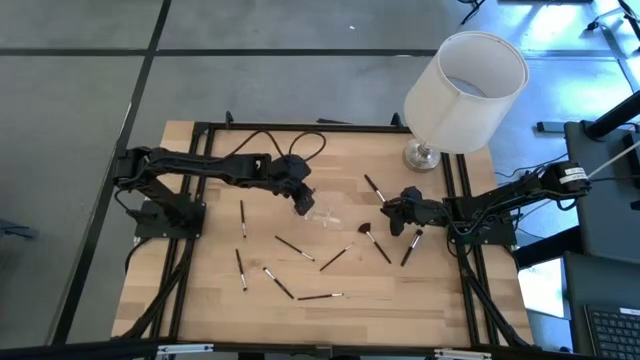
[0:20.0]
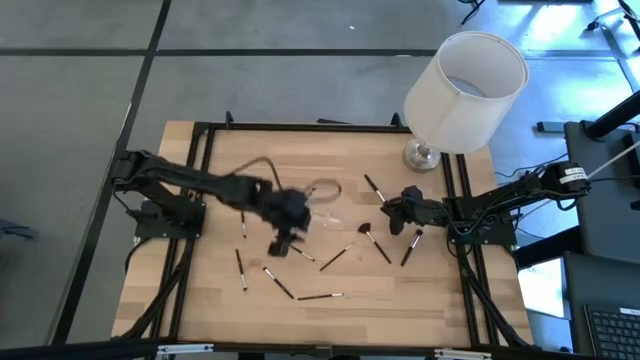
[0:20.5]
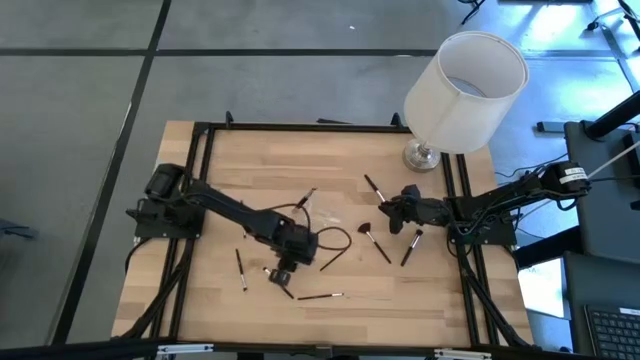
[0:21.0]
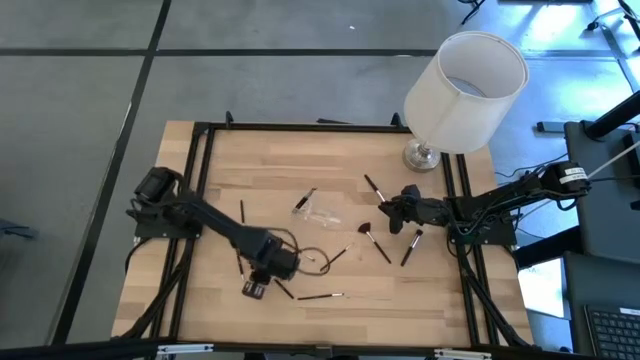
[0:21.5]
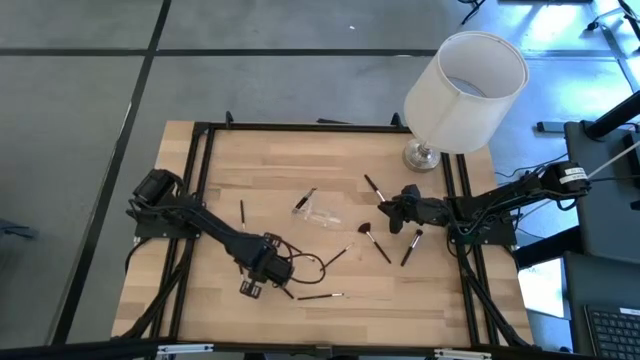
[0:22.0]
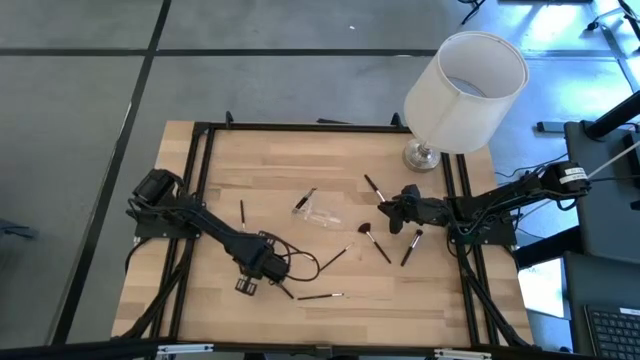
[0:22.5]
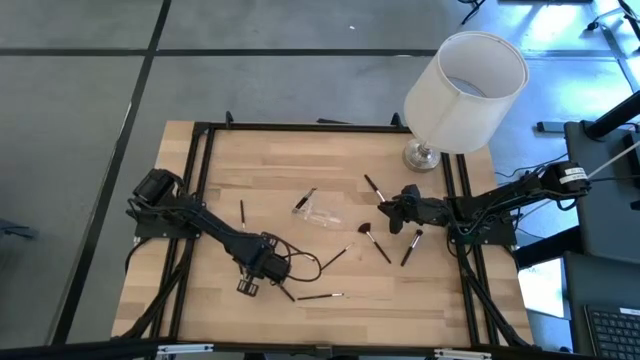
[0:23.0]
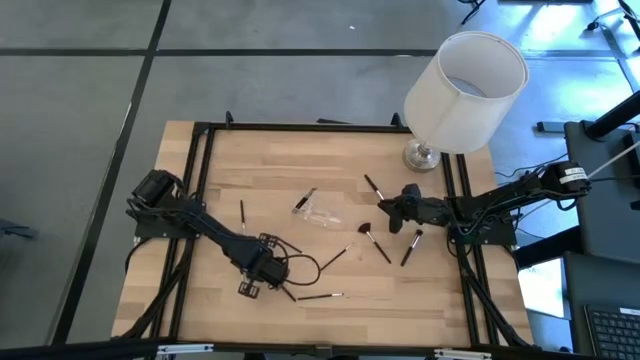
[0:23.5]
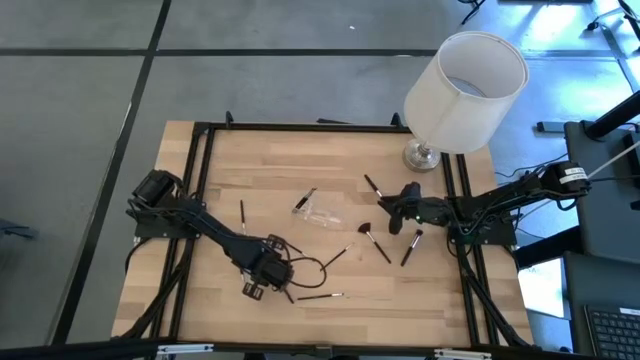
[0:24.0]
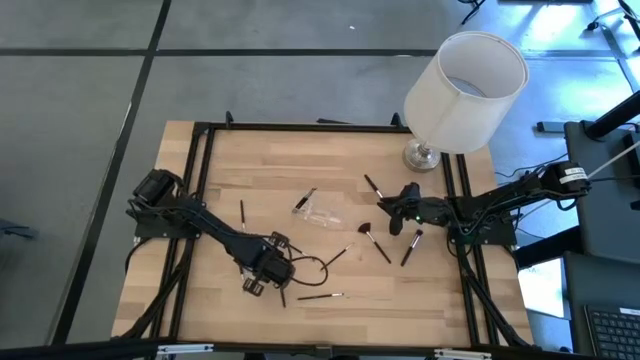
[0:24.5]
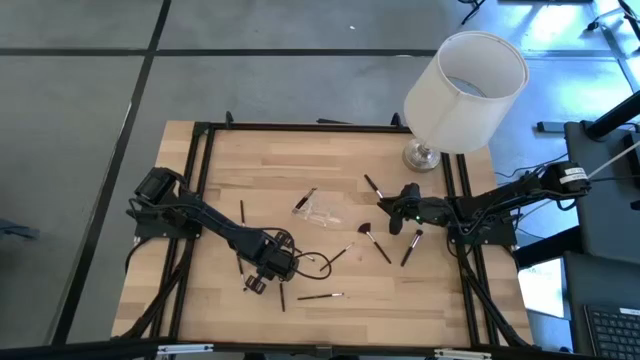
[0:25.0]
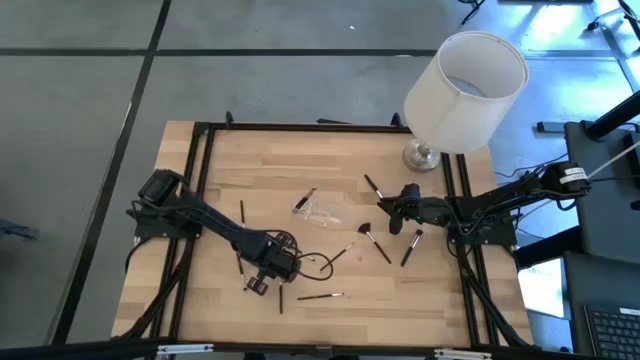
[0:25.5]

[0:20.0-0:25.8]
Task: Put items in baskets/containers
Put the eyeshadow brush into the transparent organizer

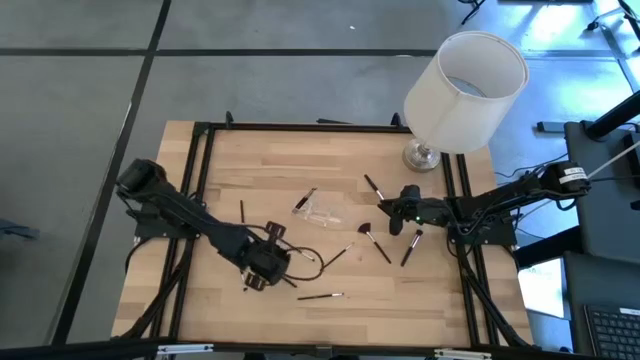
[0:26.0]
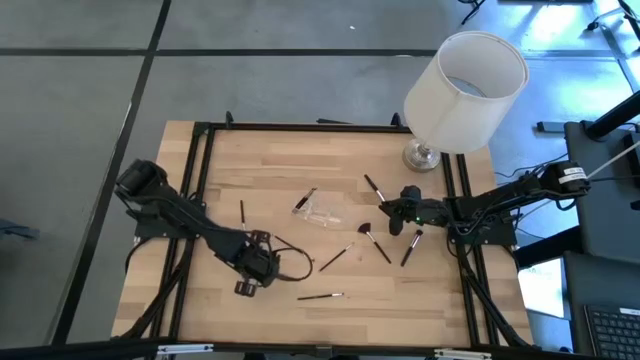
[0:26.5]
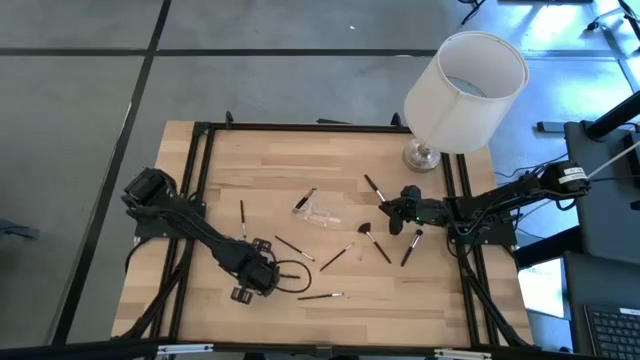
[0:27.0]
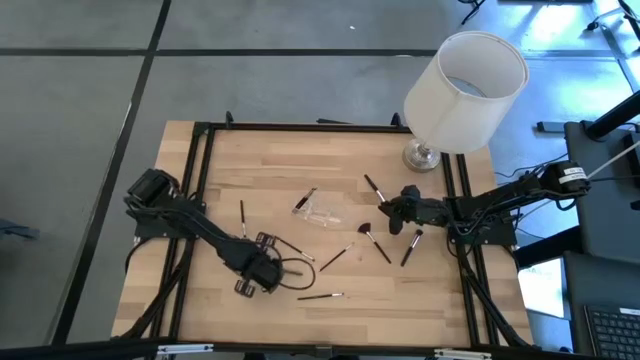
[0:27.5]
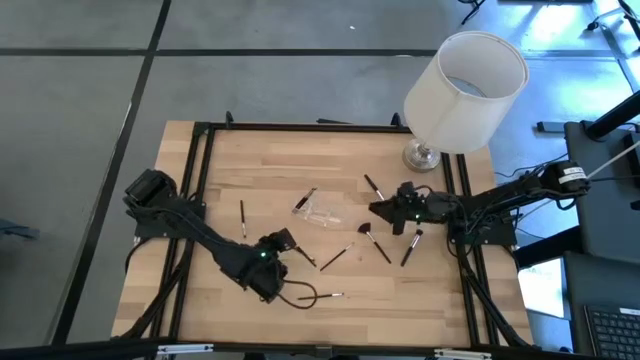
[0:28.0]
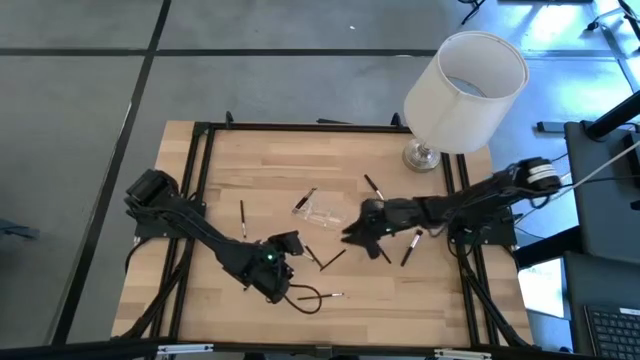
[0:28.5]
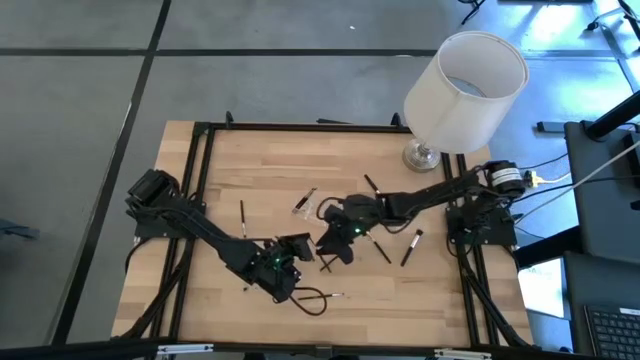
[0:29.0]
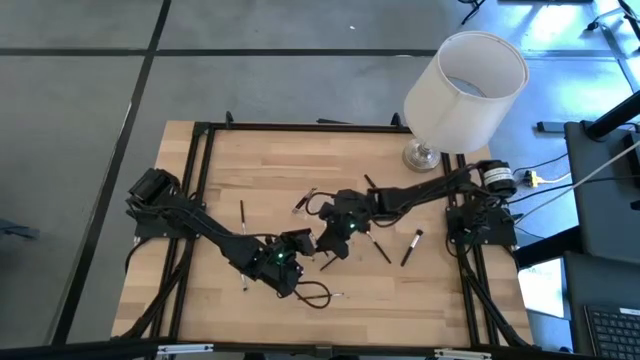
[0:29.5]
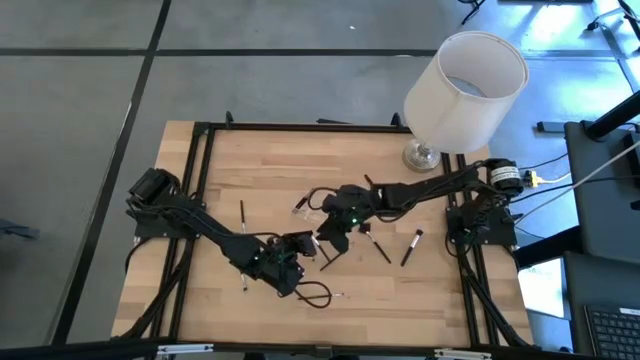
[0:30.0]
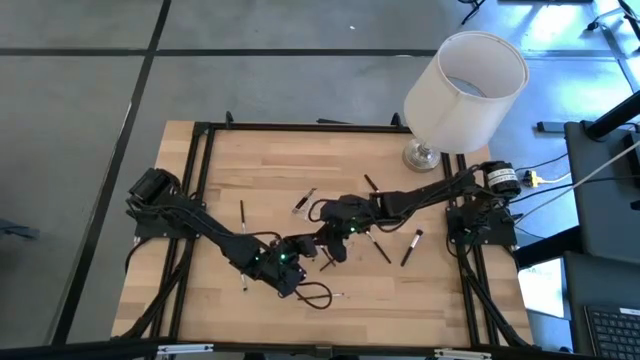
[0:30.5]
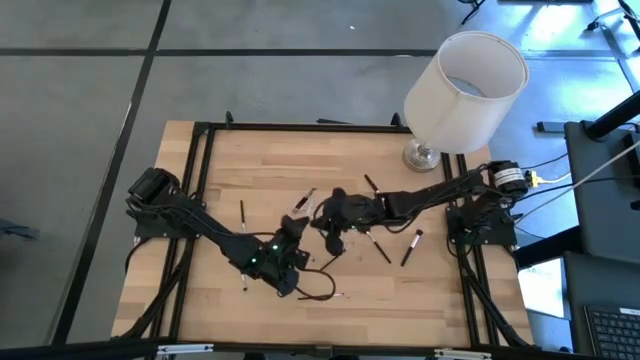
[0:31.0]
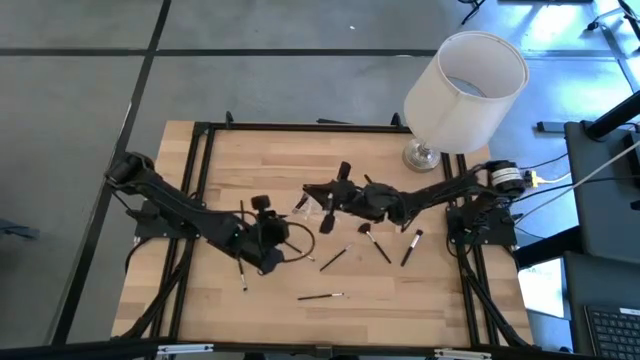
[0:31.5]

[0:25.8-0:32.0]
Put the eyeshadow brush into the transparent organizer

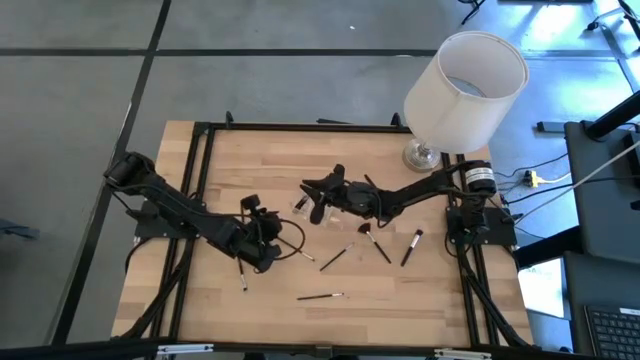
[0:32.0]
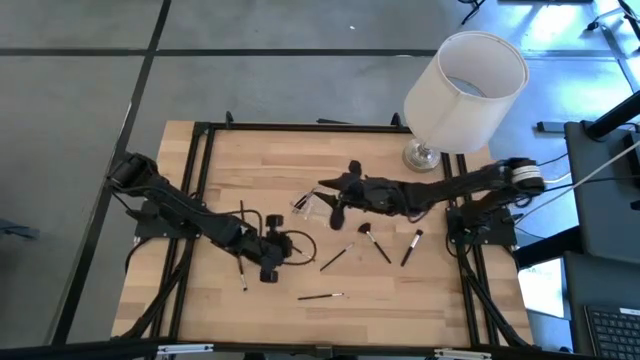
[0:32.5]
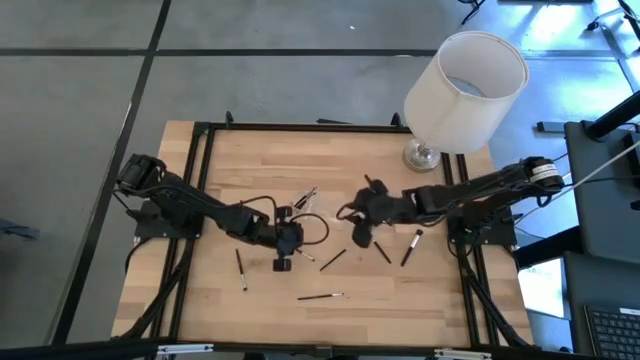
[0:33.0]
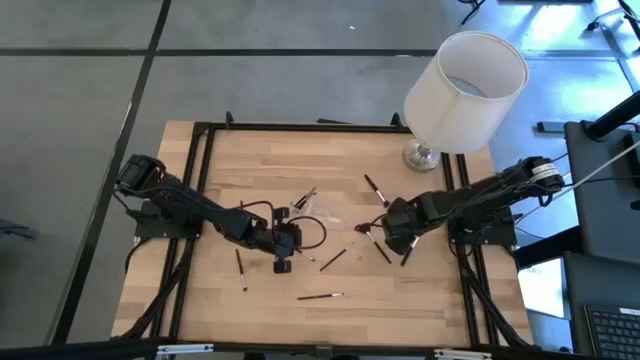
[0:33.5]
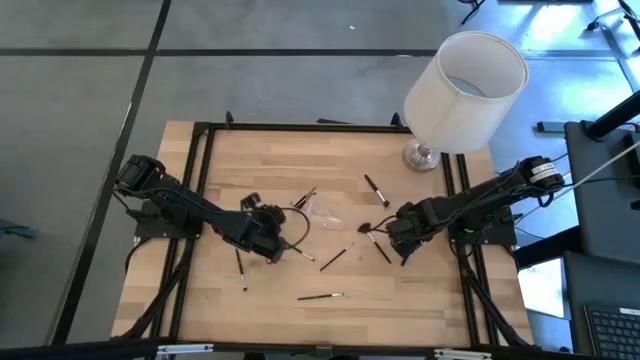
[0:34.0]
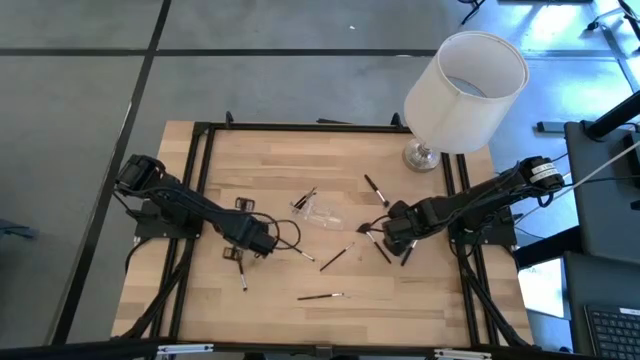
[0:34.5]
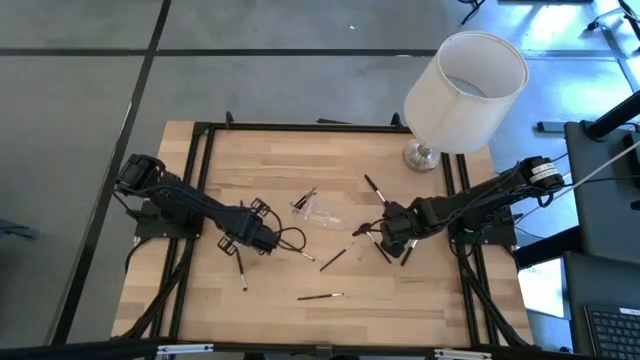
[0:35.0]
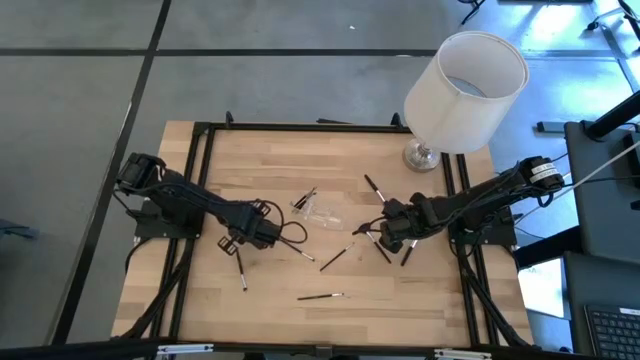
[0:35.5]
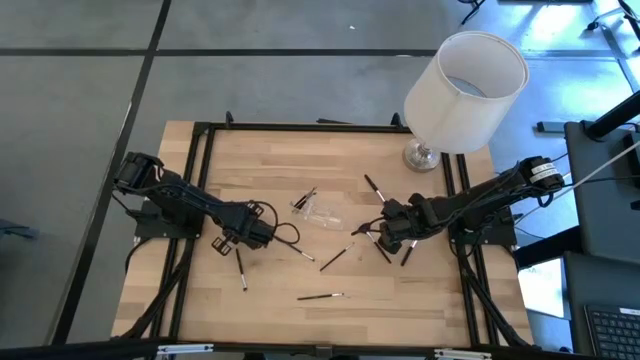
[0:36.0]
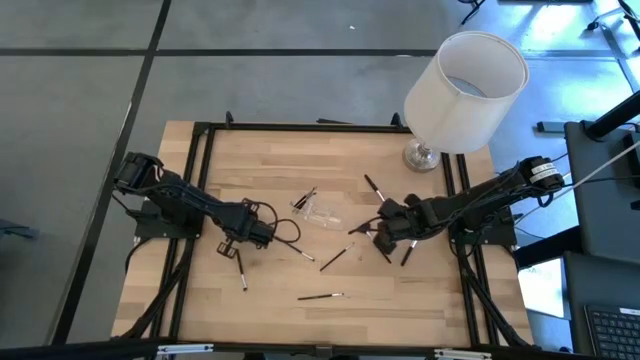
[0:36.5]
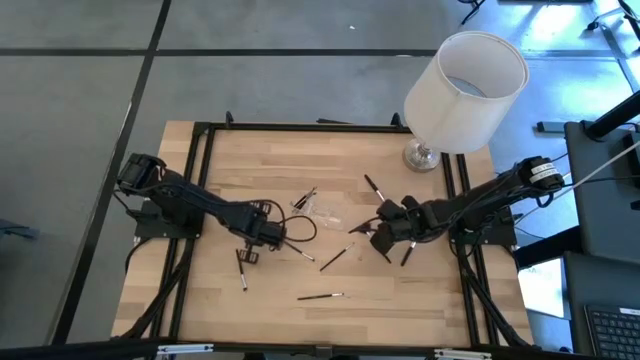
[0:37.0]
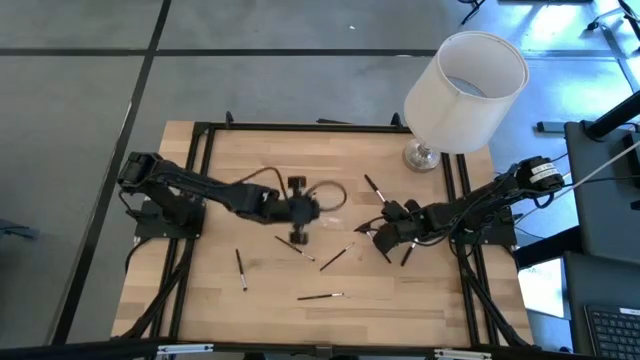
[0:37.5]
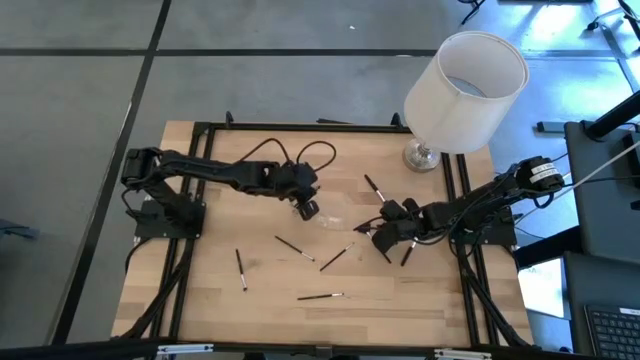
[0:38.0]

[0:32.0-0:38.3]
Put the foundation brush into the transparent organizer

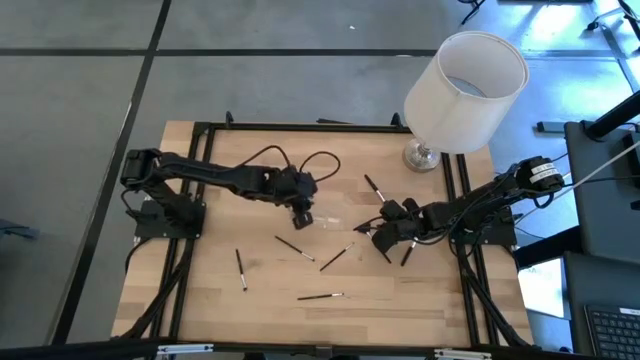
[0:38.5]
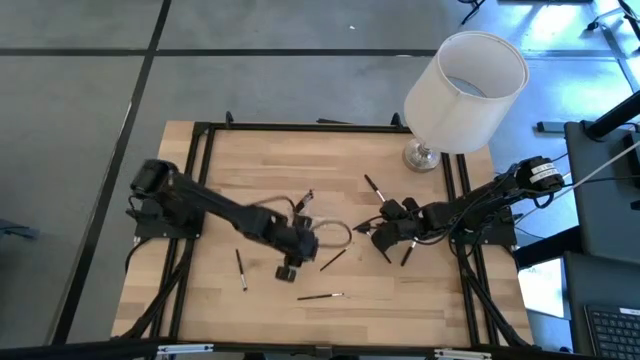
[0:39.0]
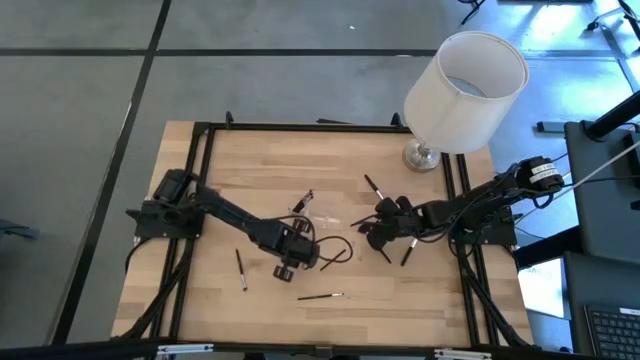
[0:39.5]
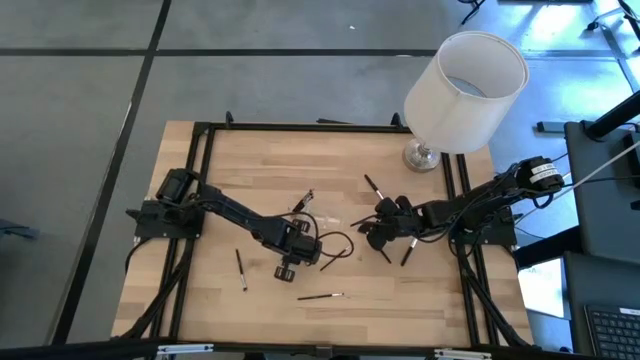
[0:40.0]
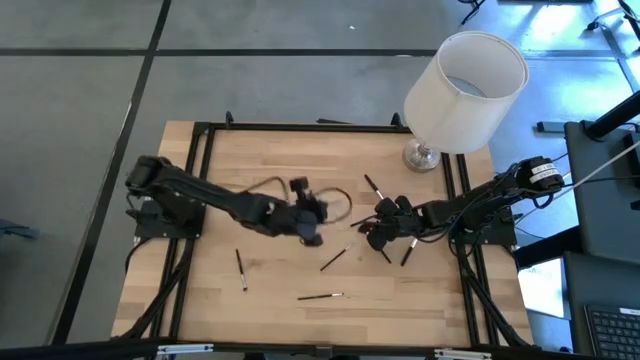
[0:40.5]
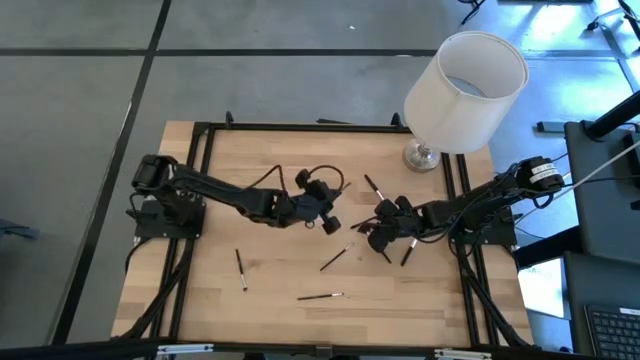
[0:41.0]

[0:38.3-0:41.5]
Put the foundation brush into the transparent organizer

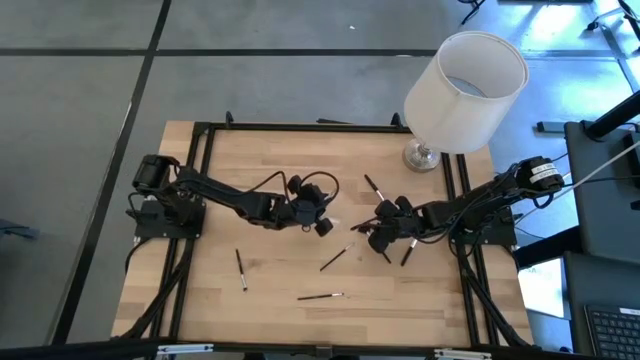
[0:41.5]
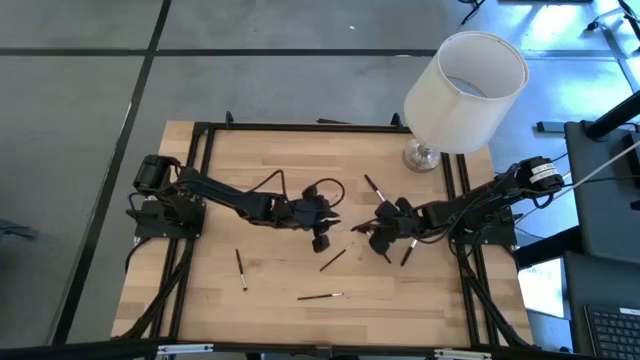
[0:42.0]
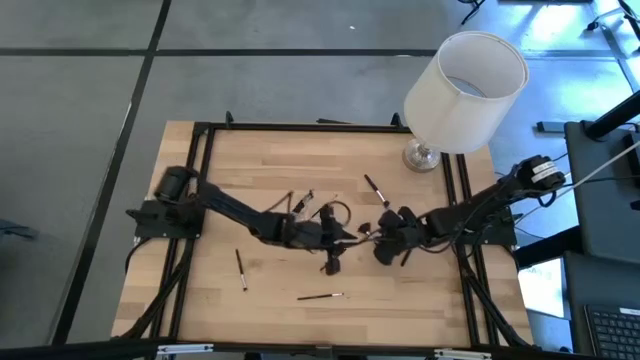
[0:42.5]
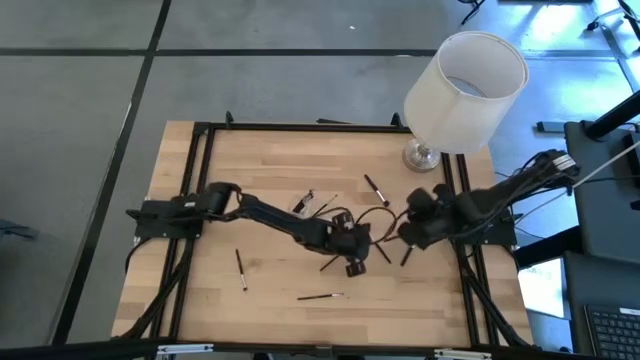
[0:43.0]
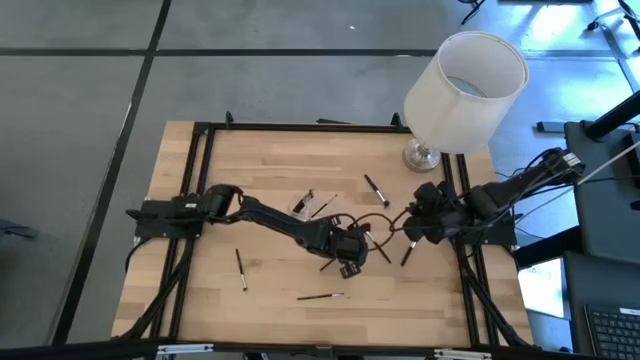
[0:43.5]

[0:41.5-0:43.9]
Put the eyeshadow brush into the transparent organizer
